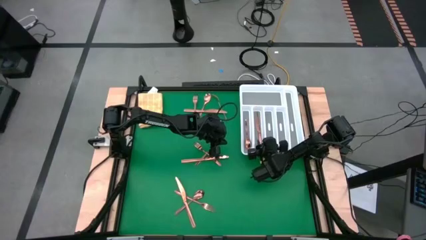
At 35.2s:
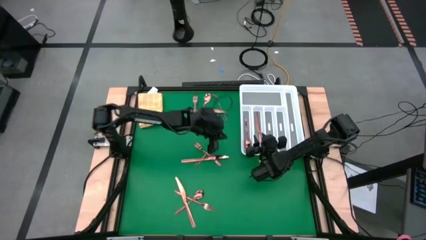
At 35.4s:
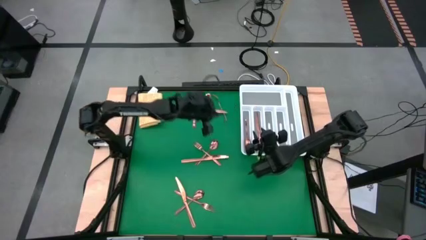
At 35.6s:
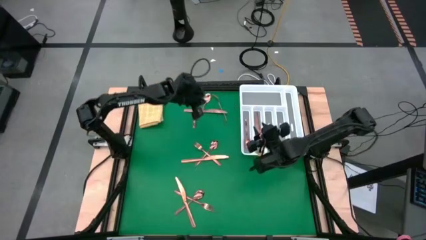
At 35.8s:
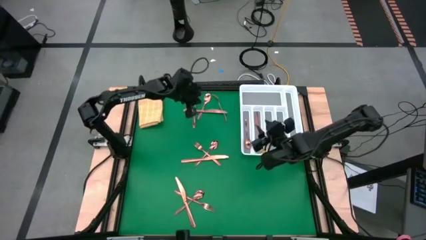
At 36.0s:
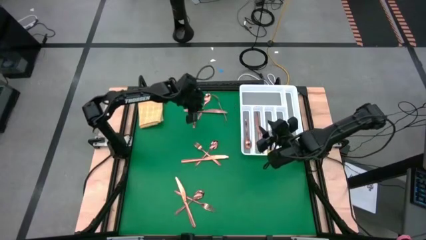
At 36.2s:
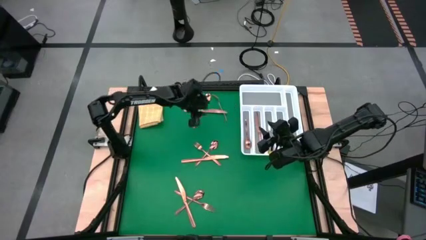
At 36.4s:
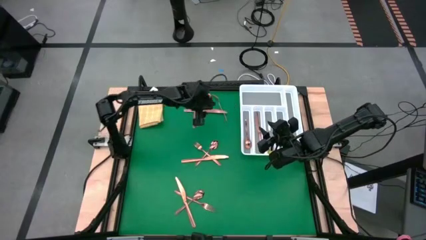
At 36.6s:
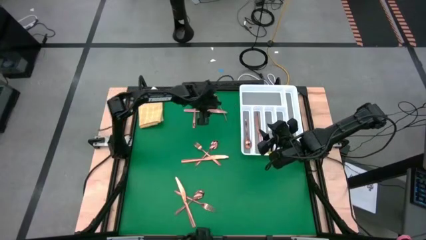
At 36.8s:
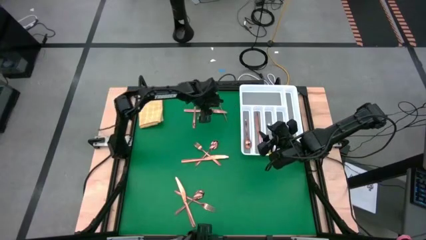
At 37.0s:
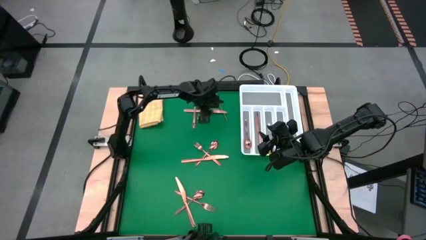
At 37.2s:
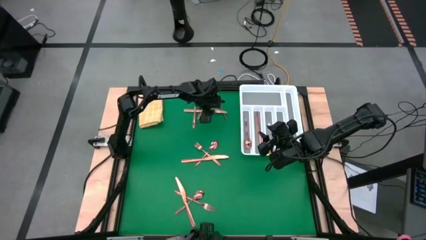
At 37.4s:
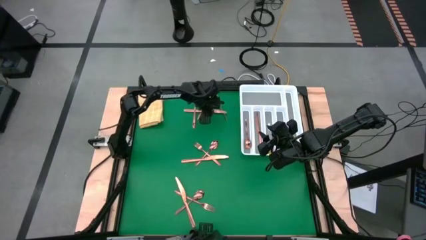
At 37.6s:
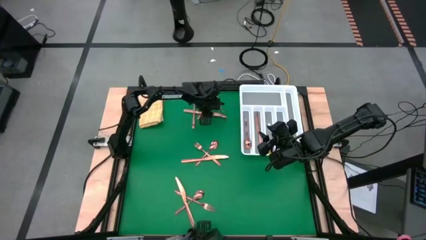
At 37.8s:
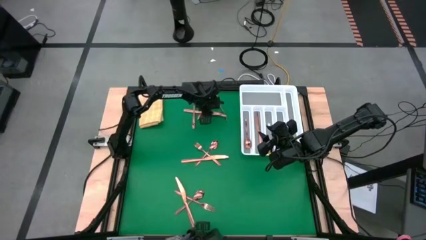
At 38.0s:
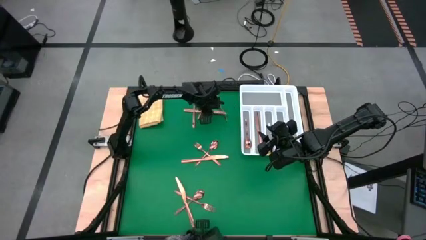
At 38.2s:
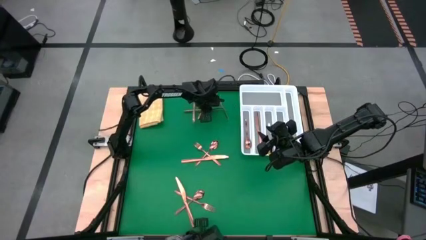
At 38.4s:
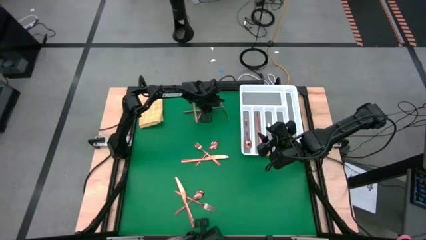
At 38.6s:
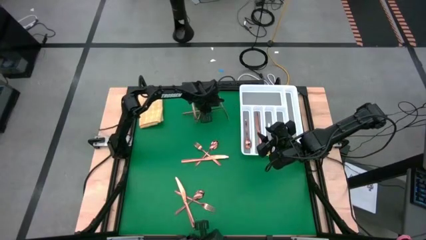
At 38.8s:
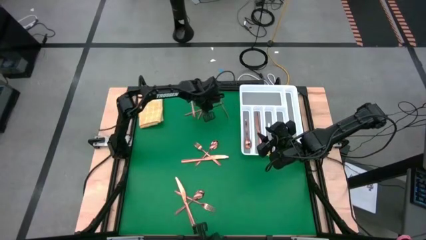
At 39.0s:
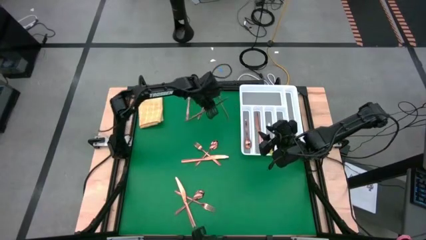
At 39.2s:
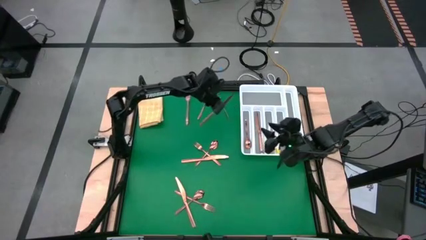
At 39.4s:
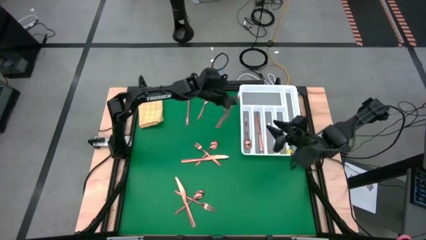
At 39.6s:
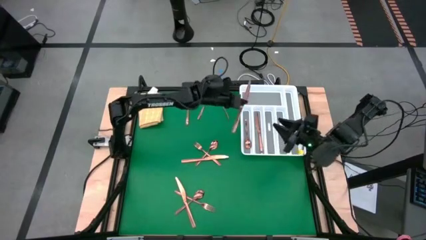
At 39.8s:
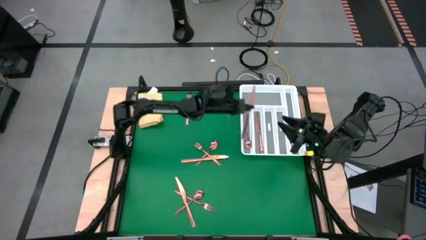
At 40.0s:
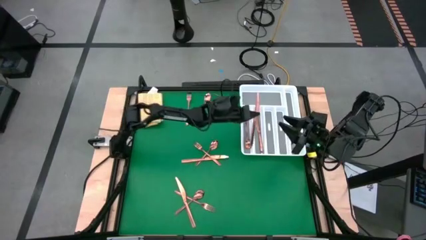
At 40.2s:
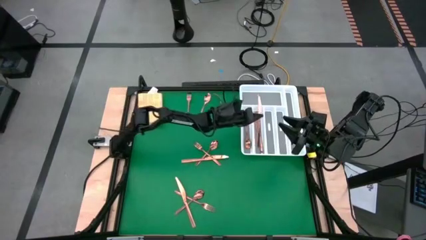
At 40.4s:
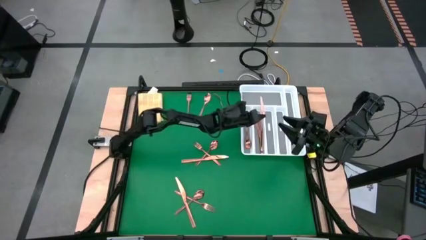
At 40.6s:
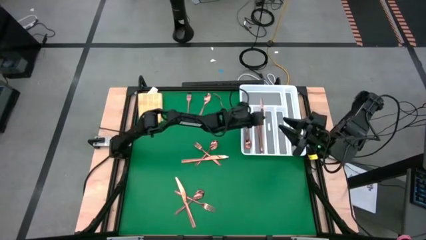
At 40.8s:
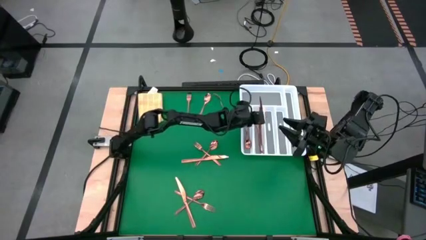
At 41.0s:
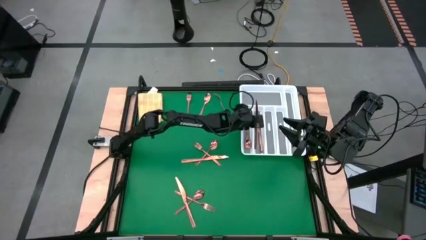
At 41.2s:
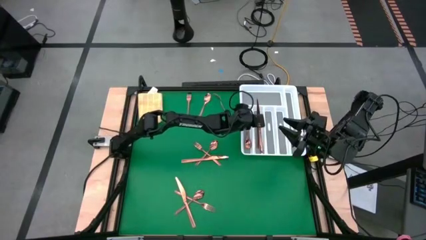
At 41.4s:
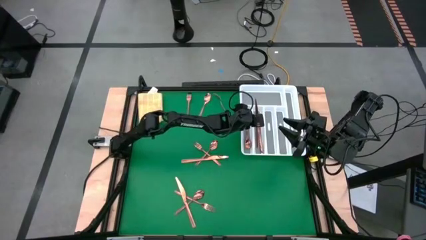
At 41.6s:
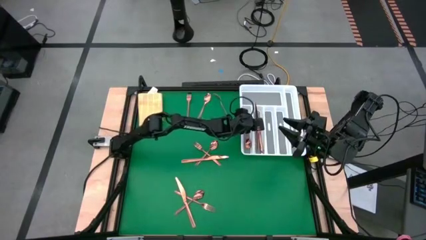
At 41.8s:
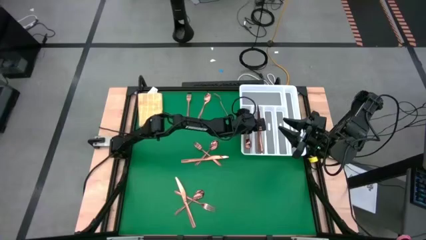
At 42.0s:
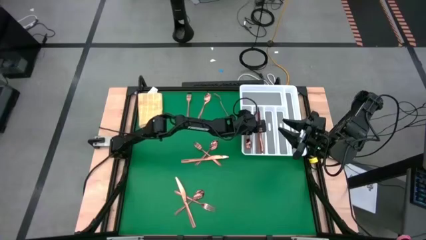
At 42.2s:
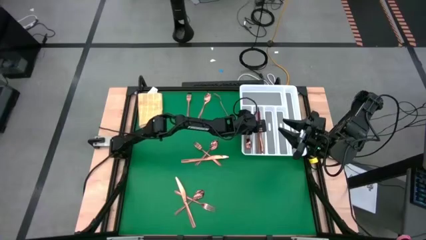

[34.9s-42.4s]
Task: Sort silverware
Put the top gold table knife into the silverware organizer

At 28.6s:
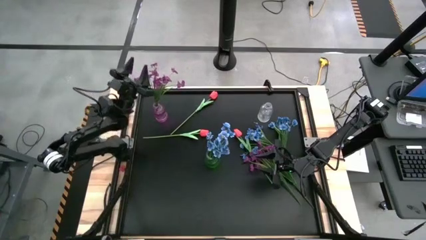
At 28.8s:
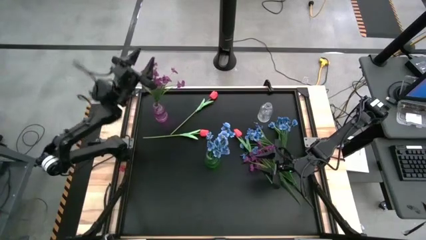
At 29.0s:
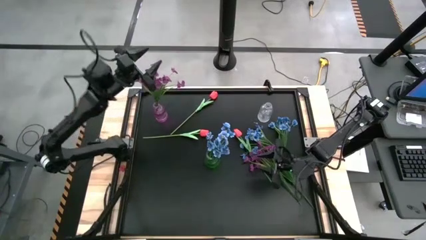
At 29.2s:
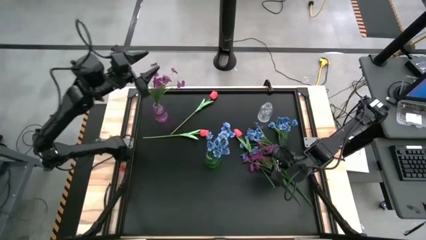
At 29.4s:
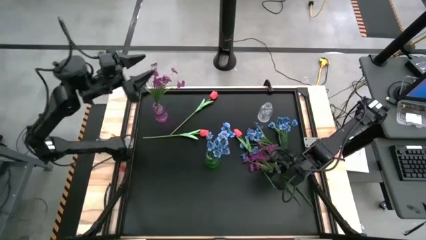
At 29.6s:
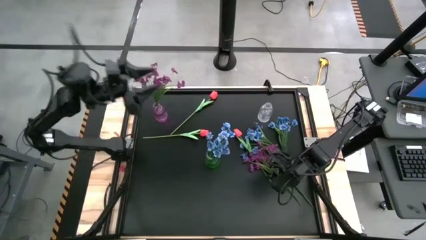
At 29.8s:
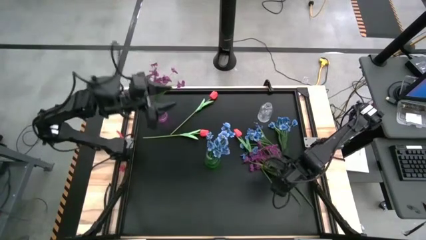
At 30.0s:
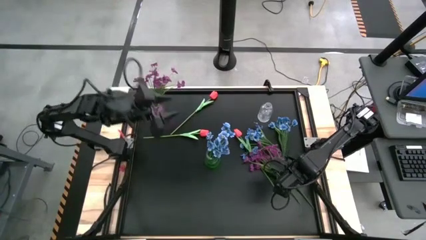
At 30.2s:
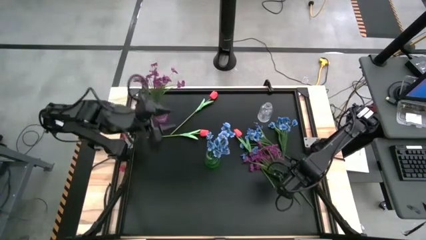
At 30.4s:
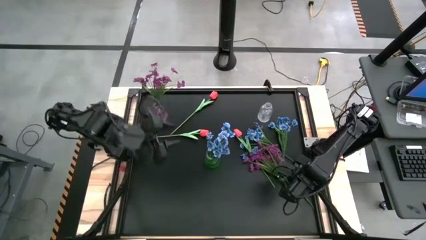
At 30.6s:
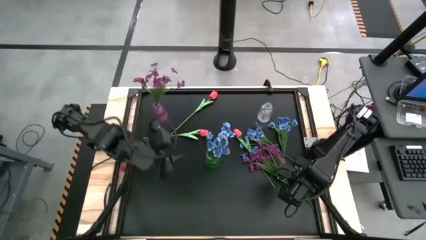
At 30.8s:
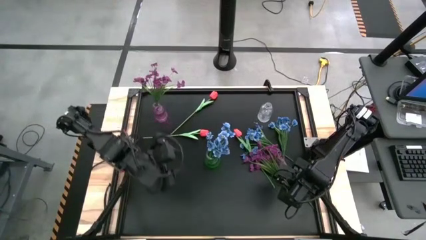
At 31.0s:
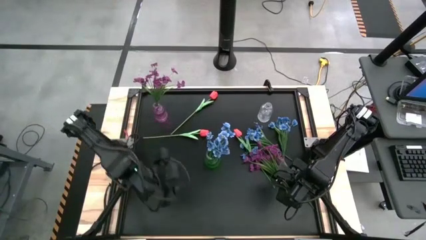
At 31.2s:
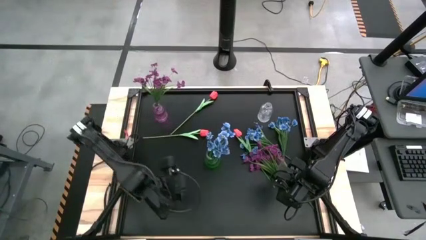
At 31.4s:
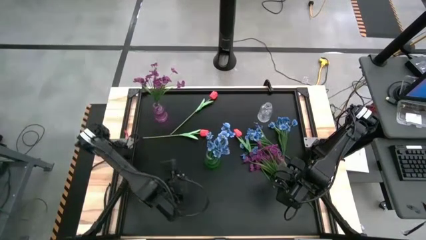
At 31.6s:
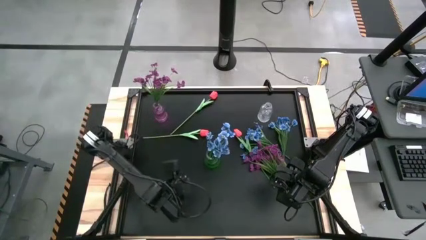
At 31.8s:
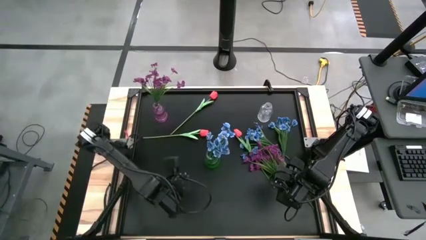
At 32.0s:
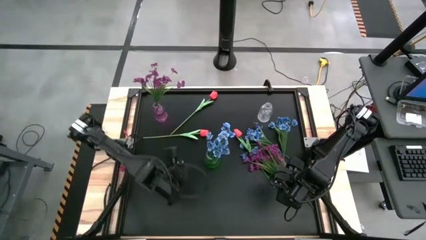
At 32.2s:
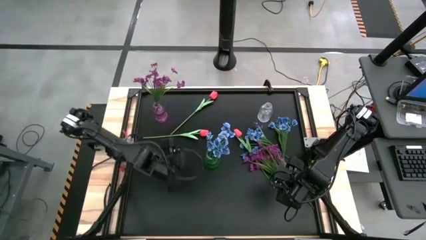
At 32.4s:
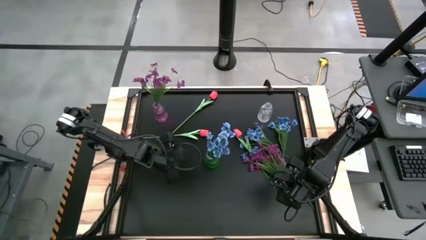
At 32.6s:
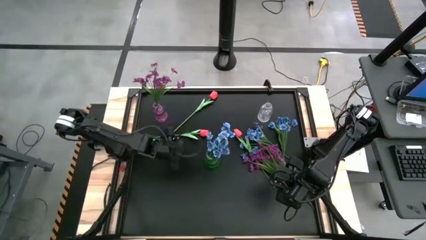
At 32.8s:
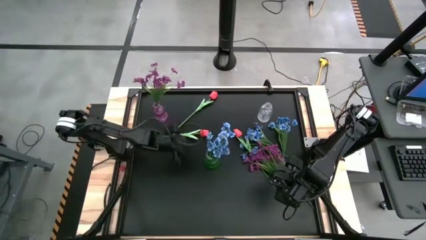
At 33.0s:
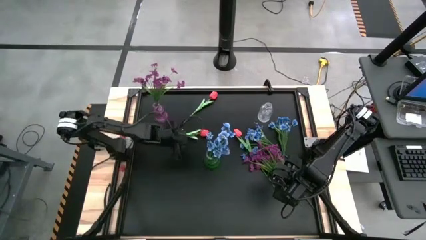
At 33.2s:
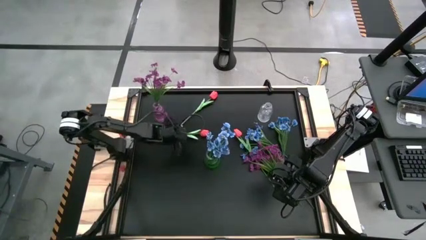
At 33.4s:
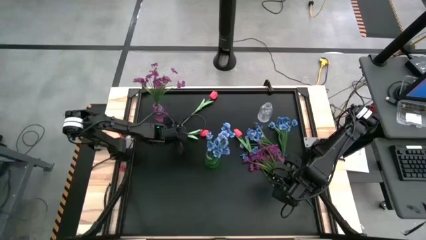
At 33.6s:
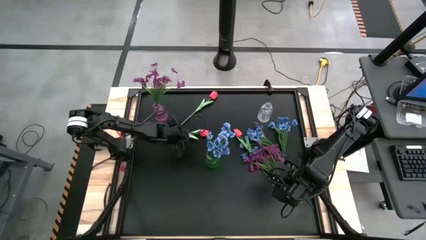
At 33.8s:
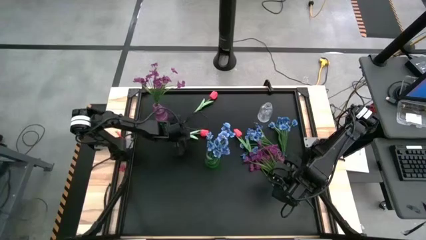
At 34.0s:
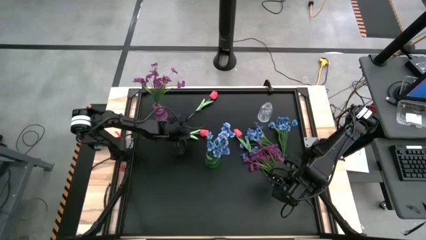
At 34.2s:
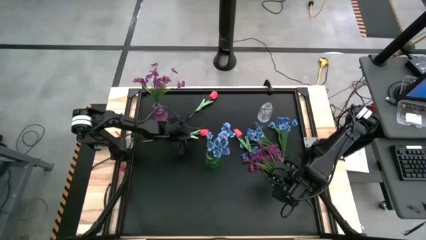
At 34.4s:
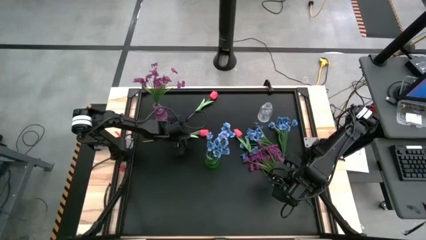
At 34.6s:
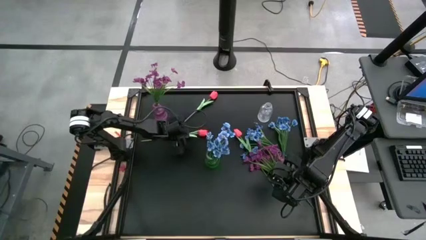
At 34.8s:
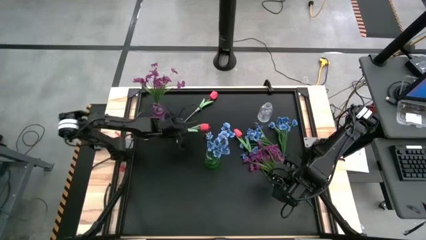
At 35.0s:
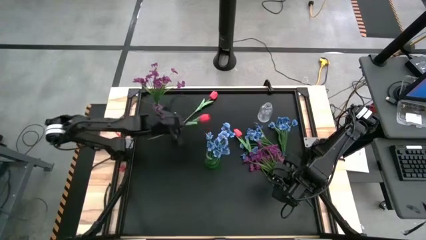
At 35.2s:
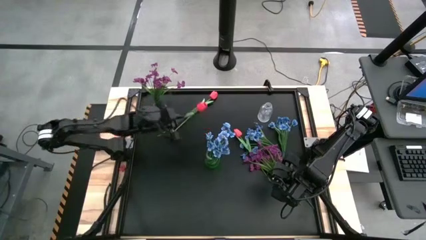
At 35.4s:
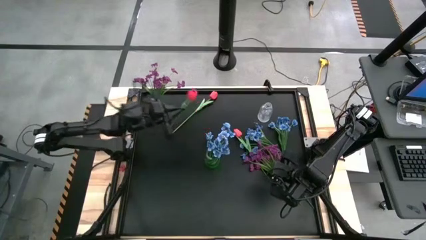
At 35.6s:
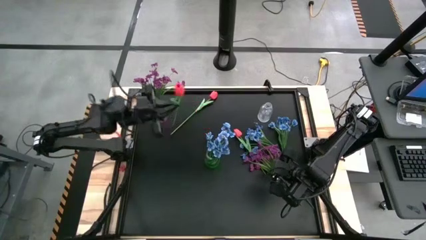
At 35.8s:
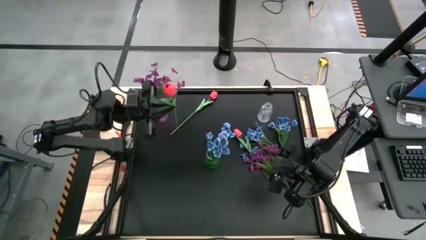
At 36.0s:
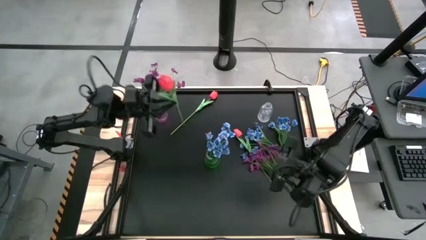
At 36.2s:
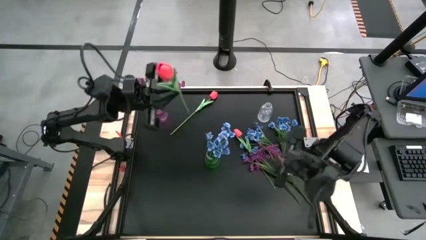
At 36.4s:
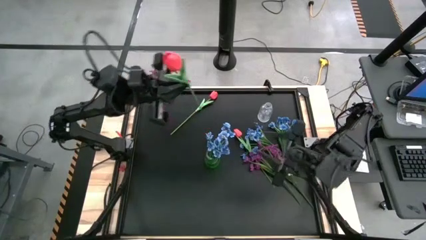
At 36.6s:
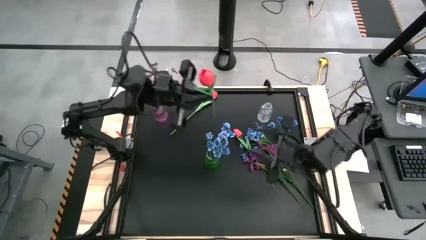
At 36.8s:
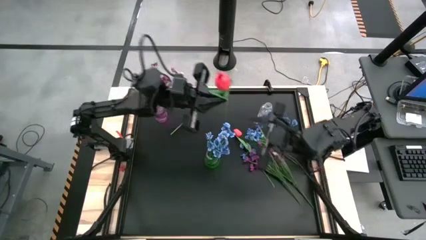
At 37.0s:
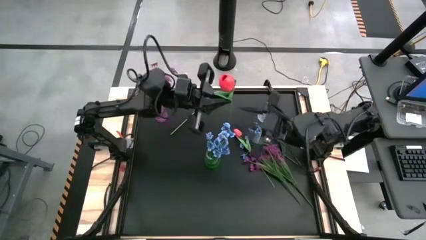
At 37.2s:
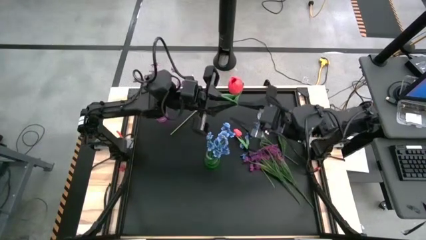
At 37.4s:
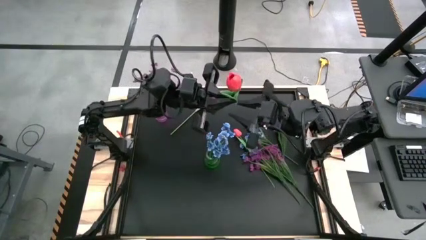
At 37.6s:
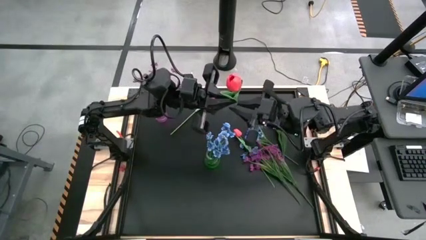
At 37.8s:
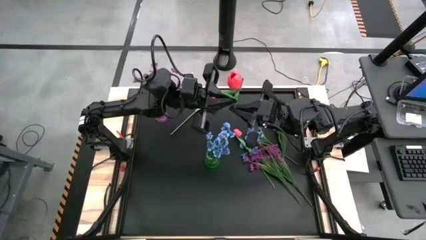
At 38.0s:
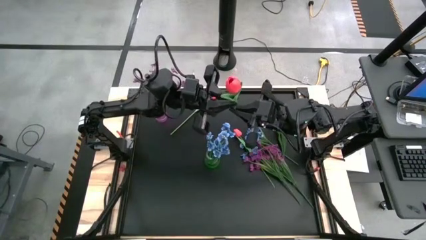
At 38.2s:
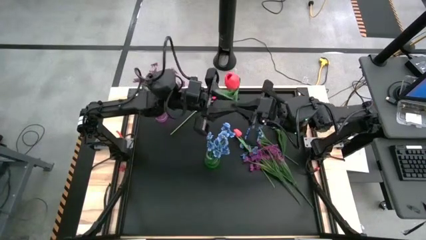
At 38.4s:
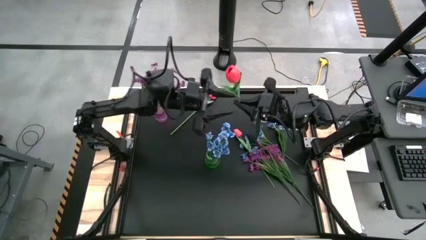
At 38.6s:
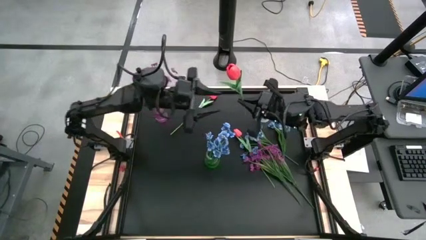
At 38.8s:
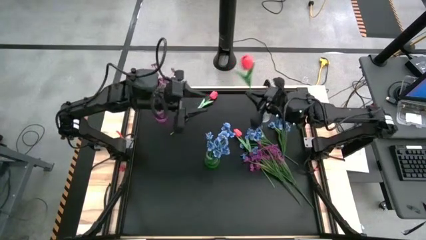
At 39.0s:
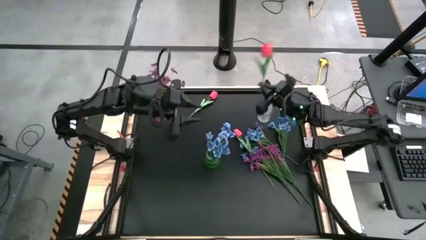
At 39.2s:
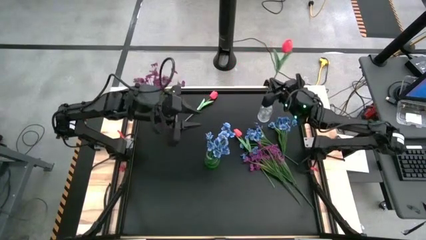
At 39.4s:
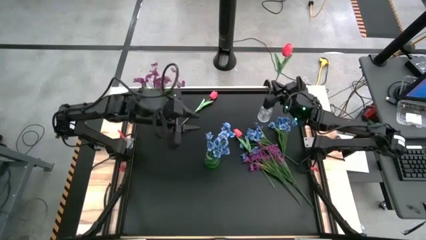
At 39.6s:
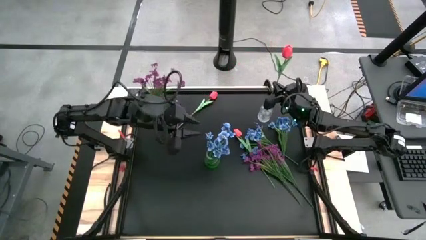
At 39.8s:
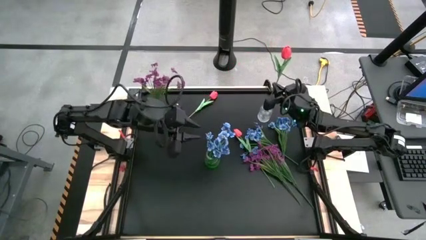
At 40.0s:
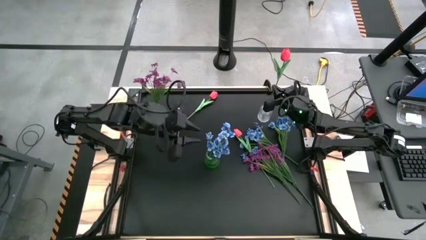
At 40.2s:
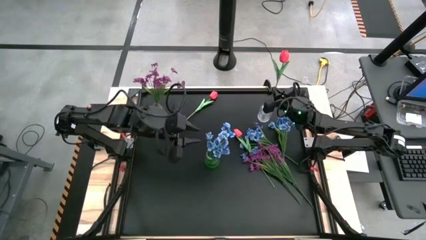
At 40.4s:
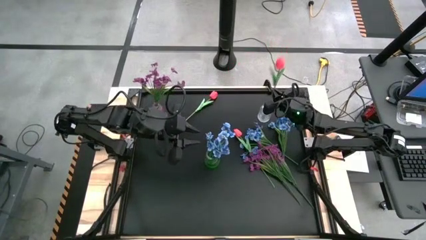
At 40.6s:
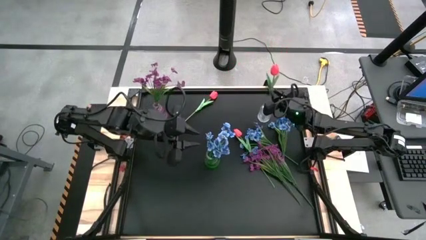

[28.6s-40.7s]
Task: Sort flowers into vase by color
Put the bottom left red flower into the transparent crystal vase
